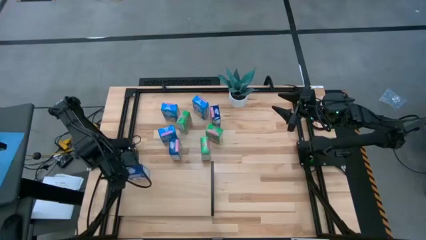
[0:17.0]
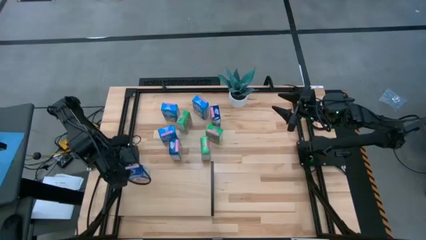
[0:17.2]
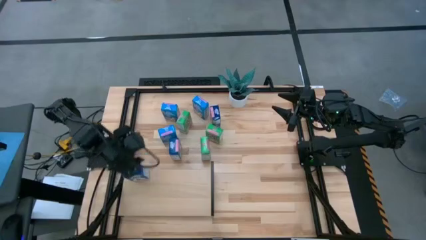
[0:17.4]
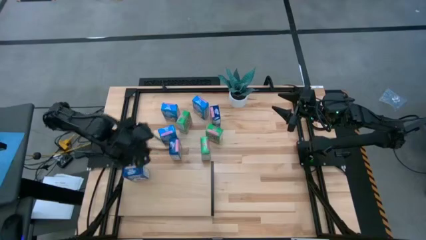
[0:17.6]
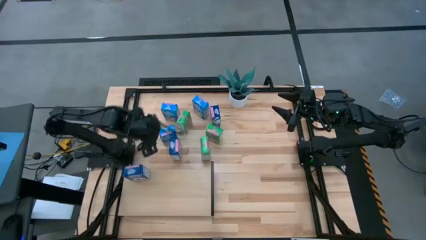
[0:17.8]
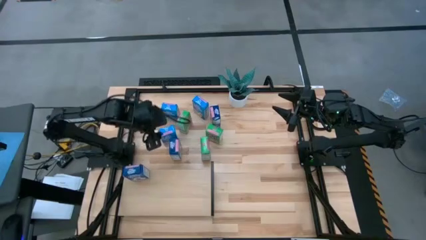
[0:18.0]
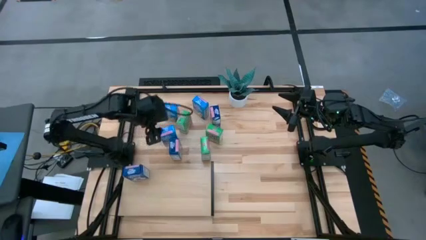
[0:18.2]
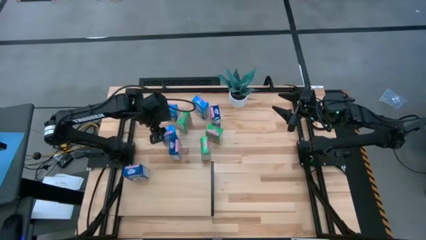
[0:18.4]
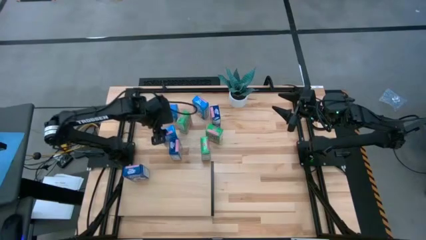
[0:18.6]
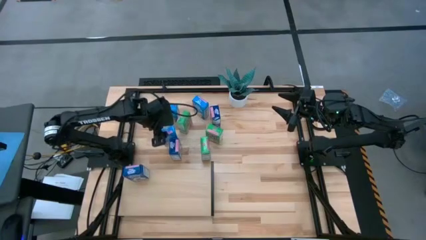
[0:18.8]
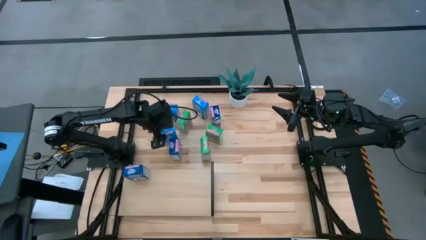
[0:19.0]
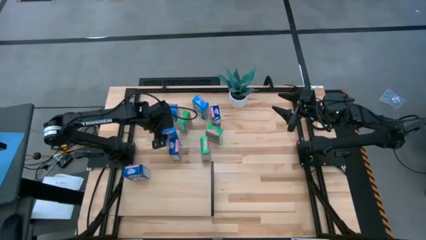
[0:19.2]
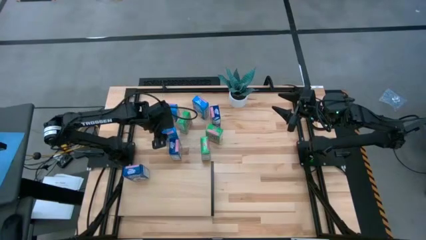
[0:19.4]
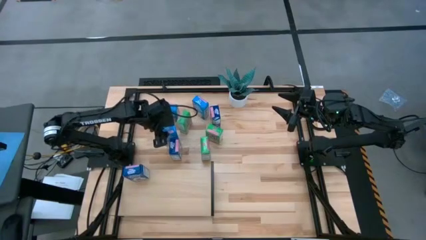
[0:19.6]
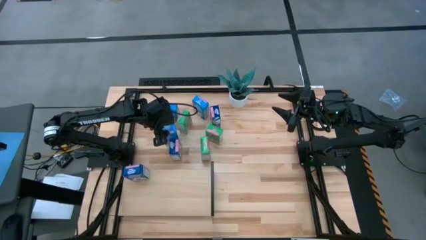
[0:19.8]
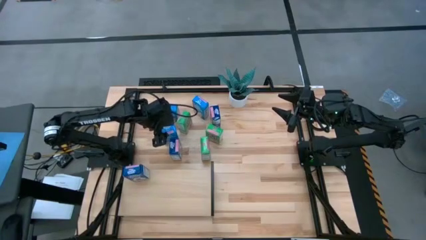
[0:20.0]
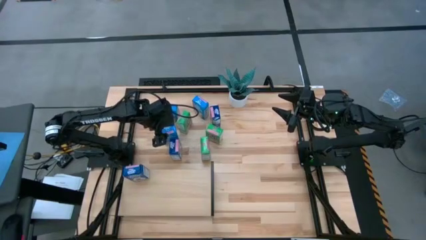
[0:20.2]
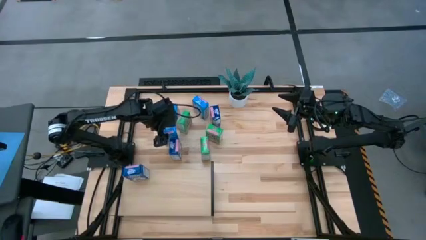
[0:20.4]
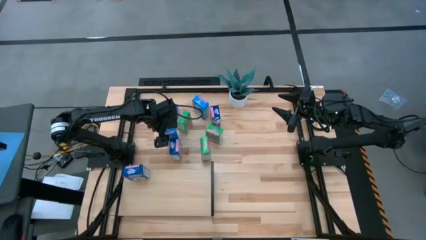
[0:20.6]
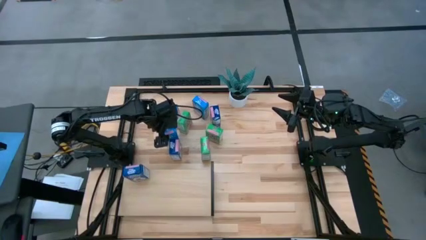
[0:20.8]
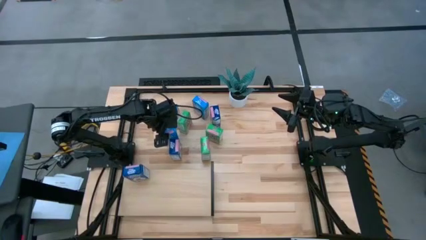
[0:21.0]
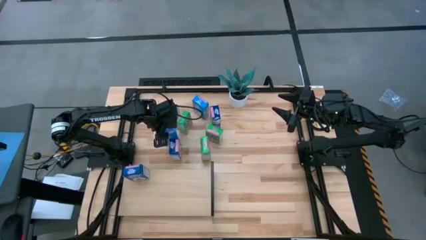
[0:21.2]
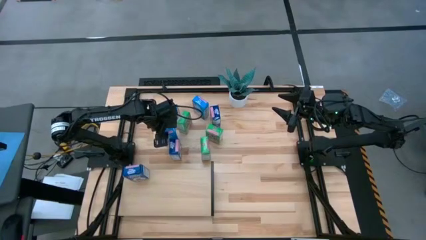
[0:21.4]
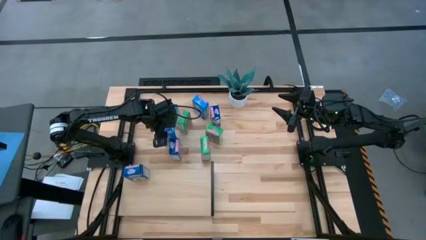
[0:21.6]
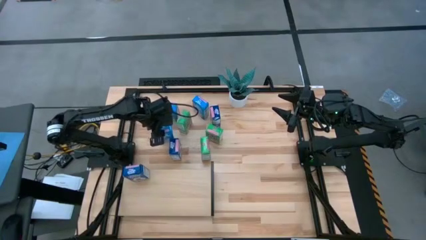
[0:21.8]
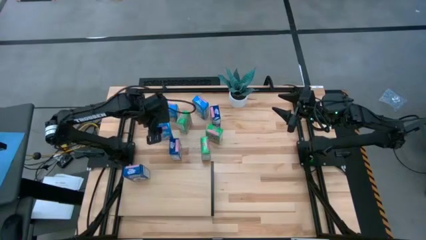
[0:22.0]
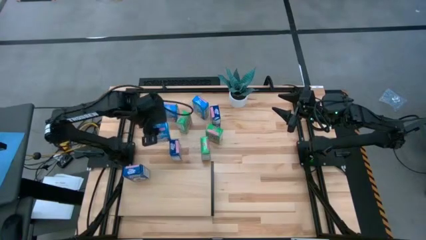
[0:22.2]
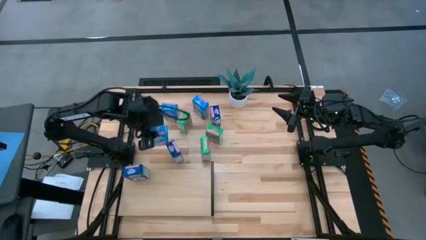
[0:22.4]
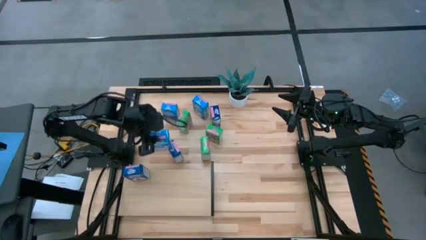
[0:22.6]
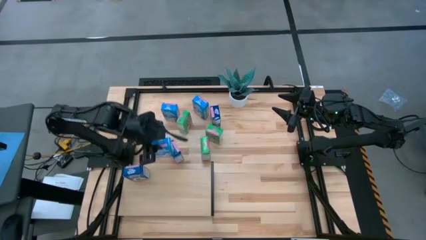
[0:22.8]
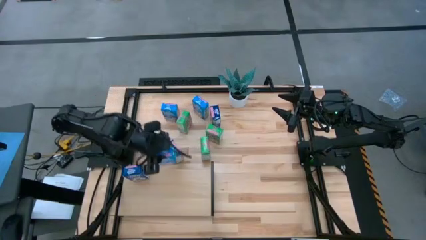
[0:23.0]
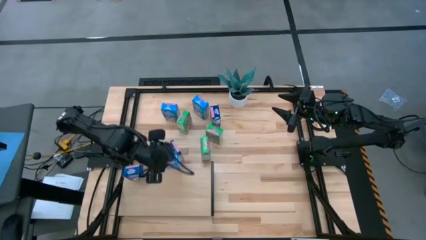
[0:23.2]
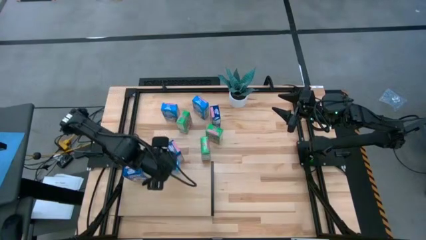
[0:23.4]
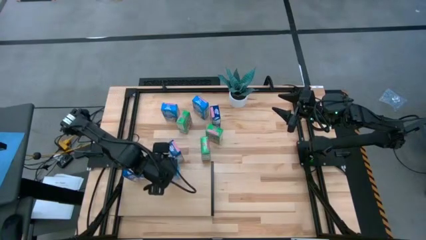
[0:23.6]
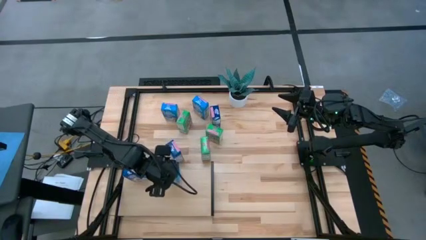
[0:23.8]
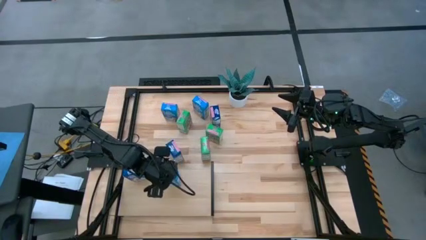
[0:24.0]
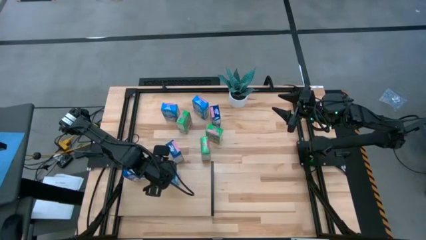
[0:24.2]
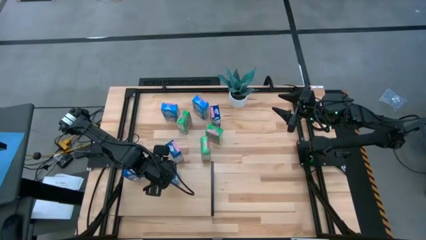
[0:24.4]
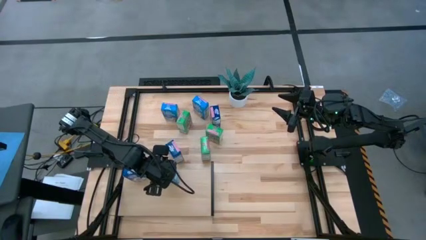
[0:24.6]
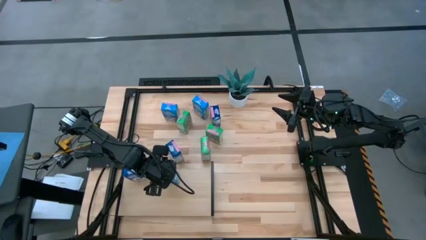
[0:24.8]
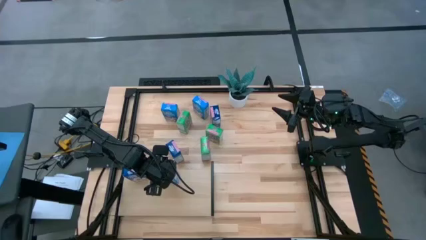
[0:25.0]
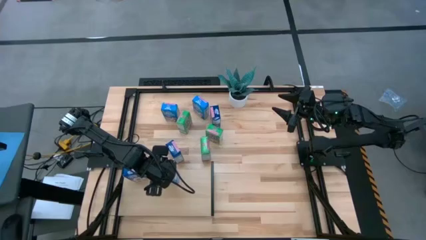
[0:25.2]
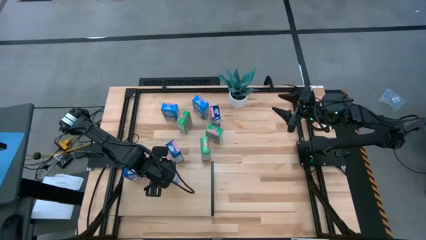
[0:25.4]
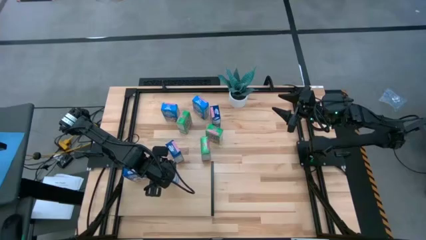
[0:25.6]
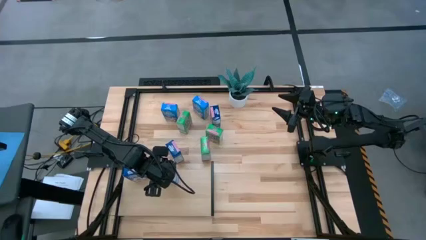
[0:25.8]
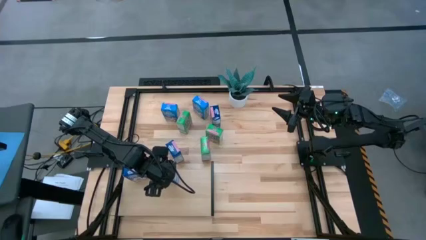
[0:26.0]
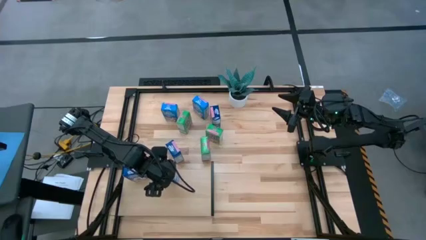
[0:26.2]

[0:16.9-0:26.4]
Task: Stack cereal on shelf
Put the bottom light blue cereal box on the shelf

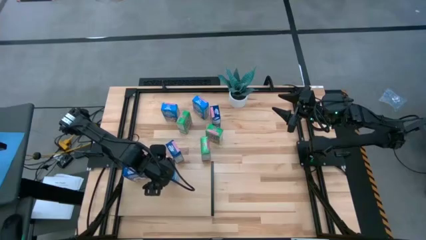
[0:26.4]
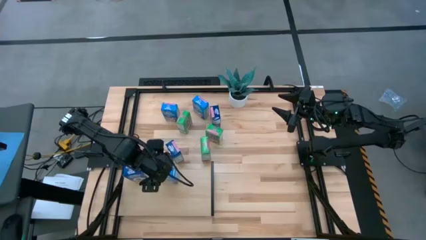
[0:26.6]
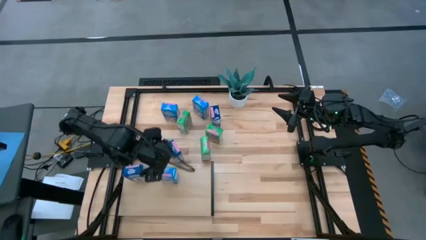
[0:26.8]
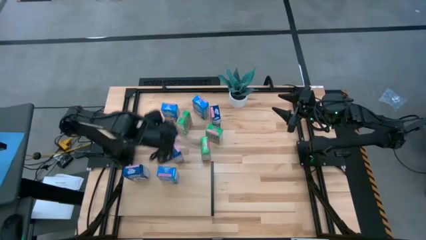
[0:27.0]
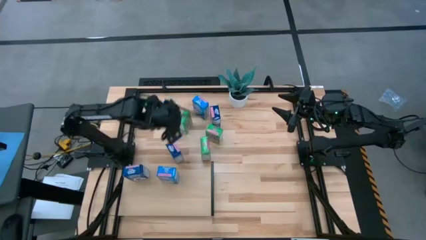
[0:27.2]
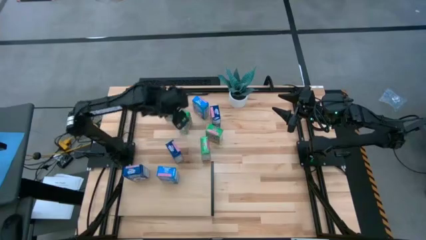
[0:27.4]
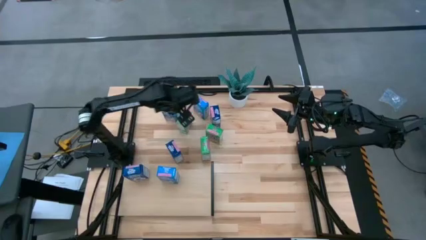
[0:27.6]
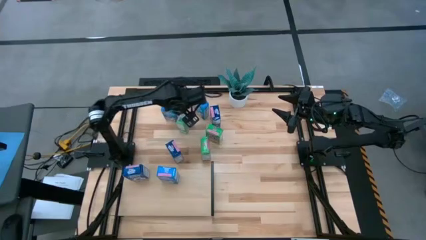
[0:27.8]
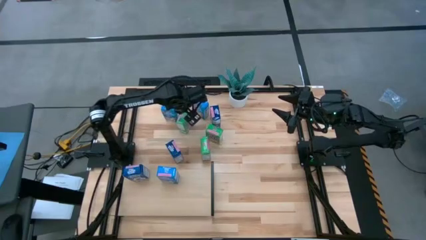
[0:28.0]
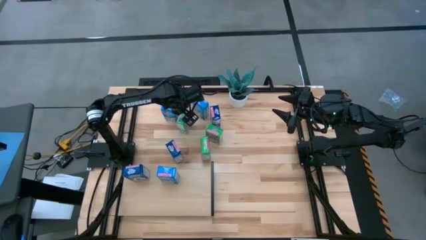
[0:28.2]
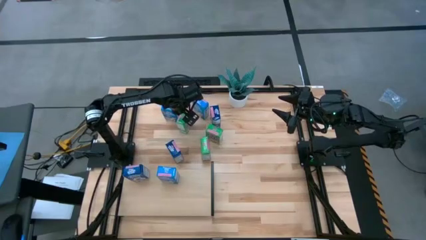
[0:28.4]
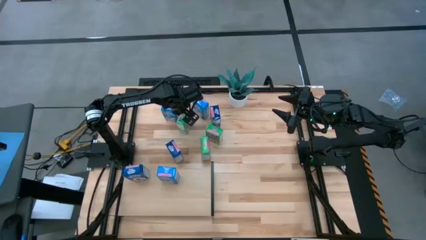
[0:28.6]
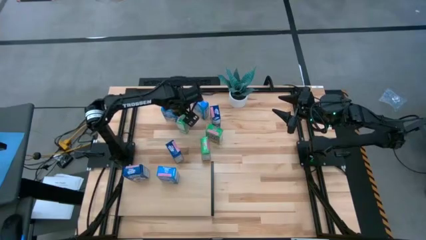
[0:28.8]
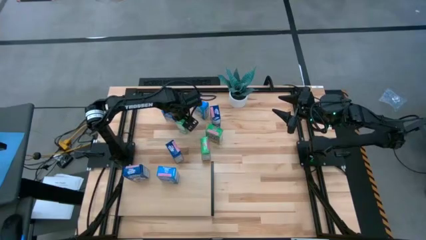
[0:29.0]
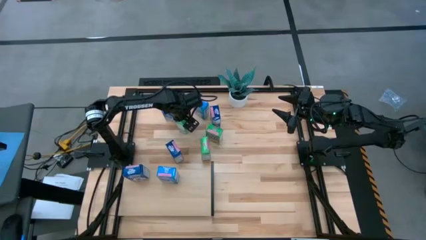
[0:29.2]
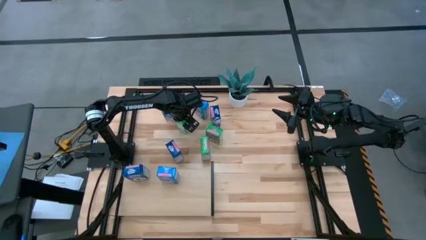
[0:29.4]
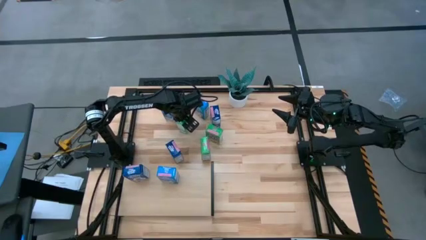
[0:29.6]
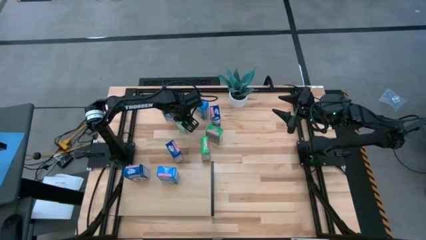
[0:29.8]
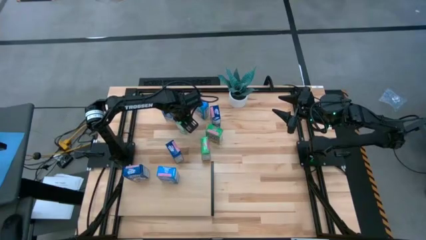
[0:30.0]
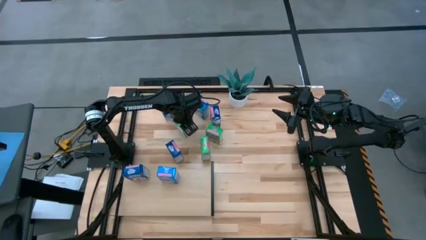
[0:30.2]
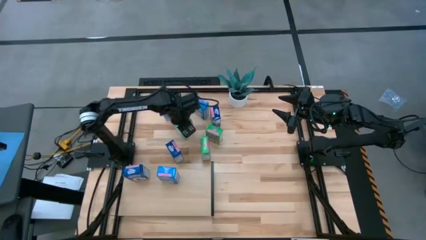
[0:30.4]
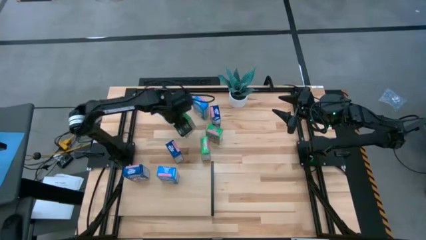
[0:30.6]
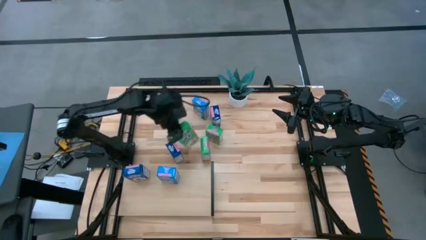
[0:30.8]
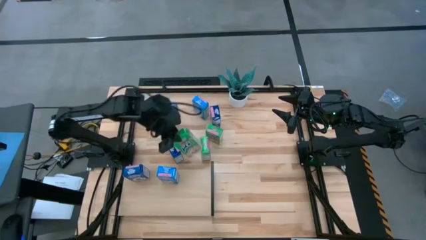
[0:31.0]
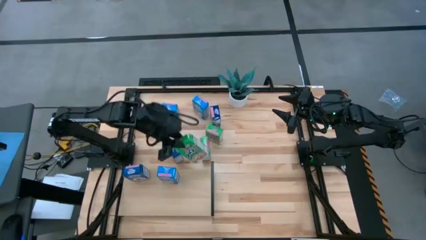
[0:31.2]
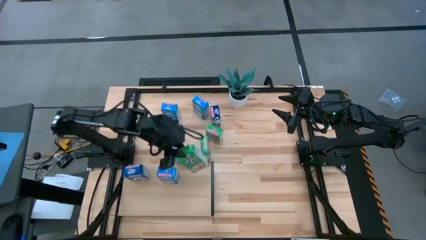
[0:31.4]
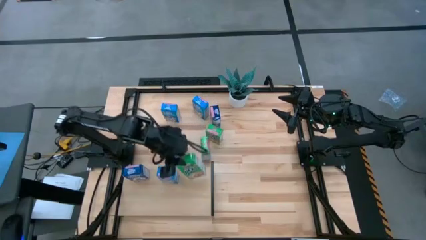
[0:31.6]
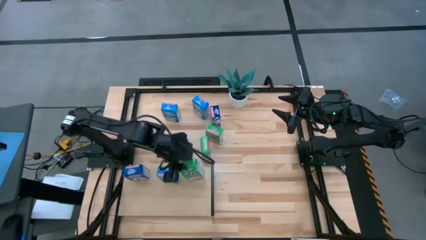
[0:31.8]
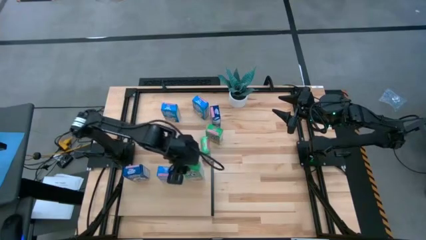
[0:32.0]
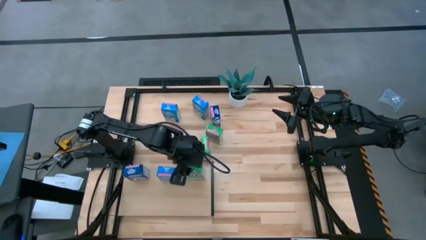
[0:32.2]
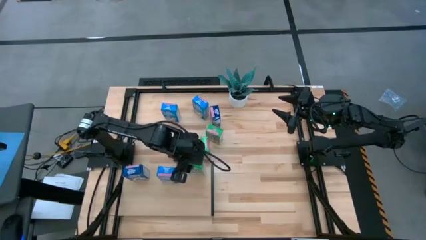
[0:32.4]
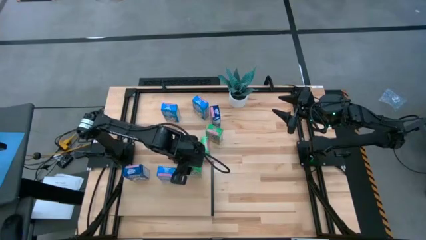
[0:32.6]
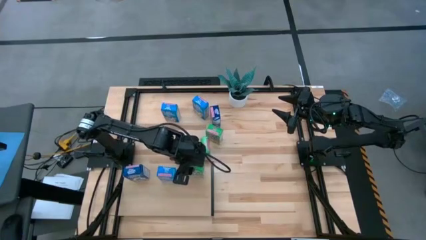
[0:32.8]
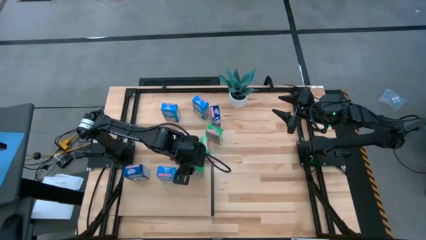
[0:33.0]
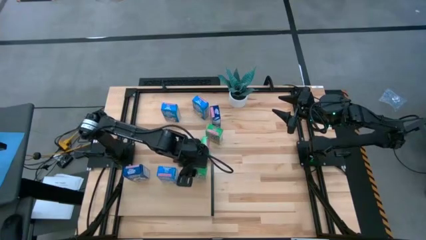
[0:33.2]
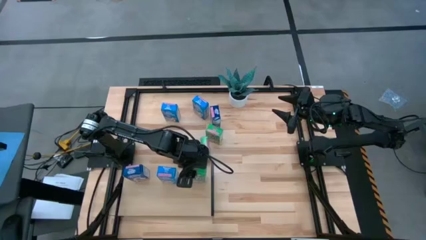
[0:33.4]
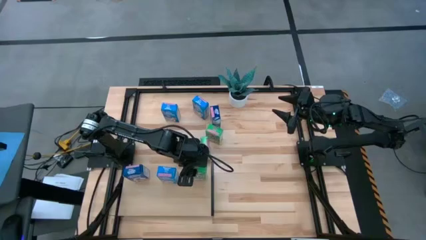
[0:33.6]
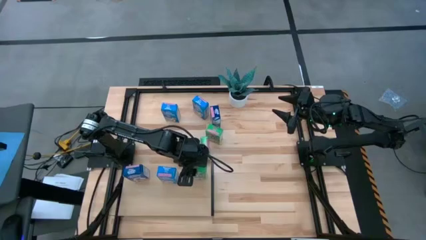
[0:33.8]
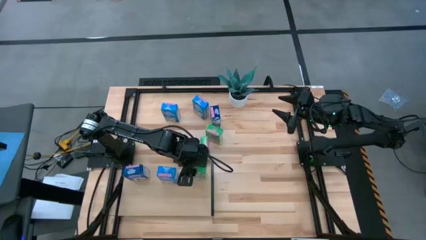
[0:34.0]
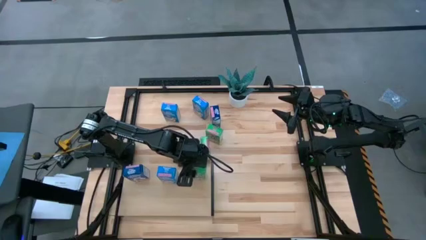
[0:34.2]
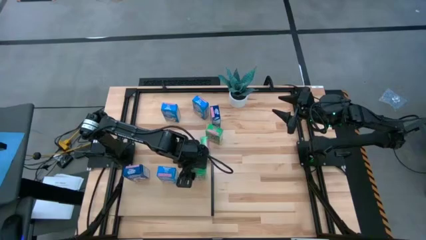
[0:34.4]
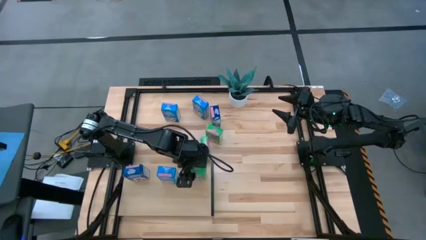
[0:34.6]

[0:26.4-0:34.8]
Put the left green cereal box on the shelf
